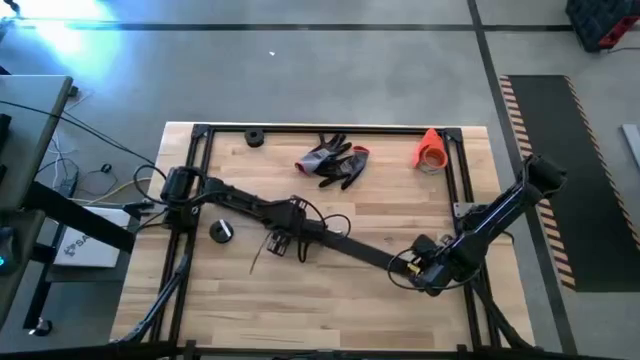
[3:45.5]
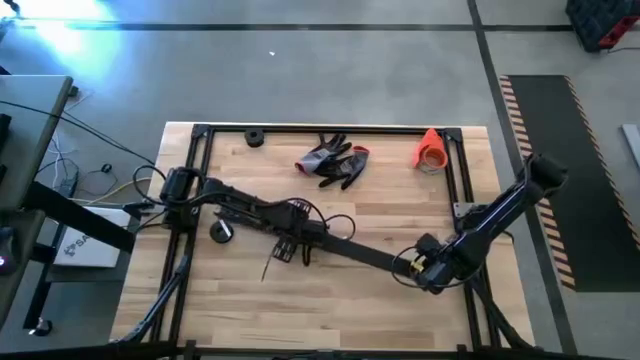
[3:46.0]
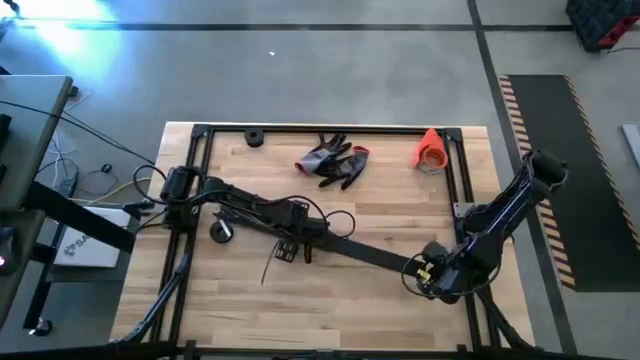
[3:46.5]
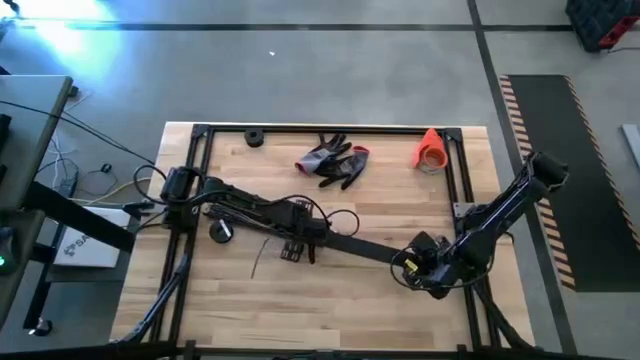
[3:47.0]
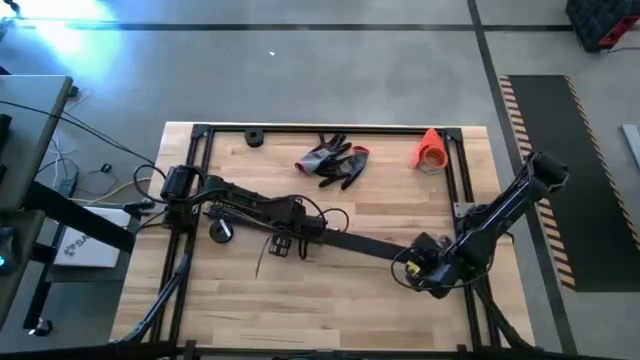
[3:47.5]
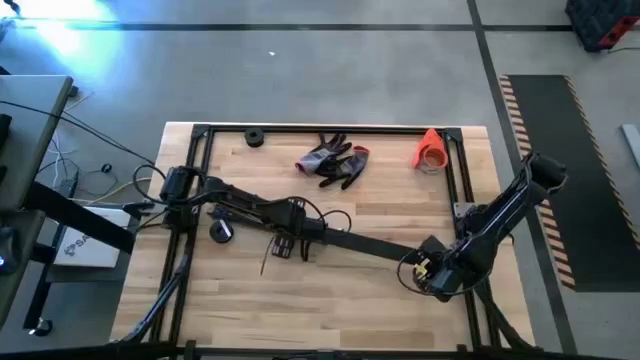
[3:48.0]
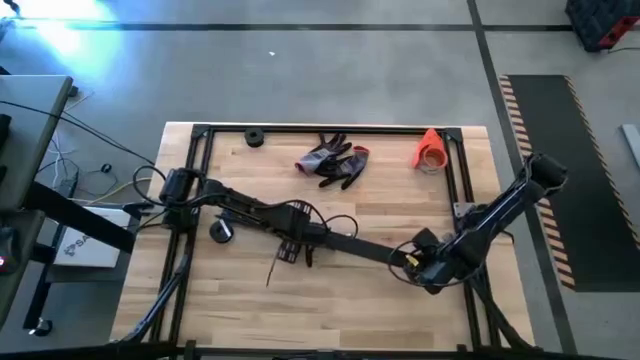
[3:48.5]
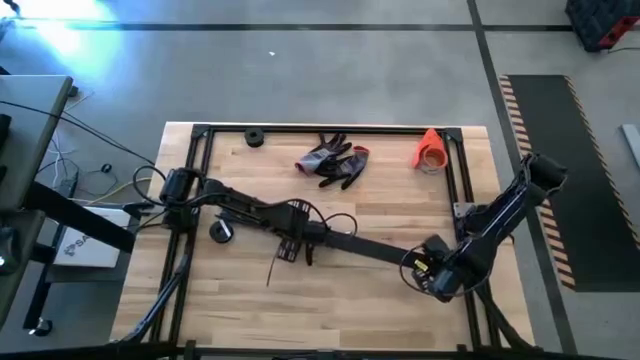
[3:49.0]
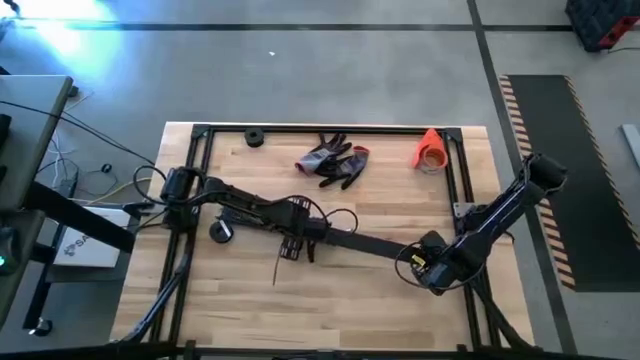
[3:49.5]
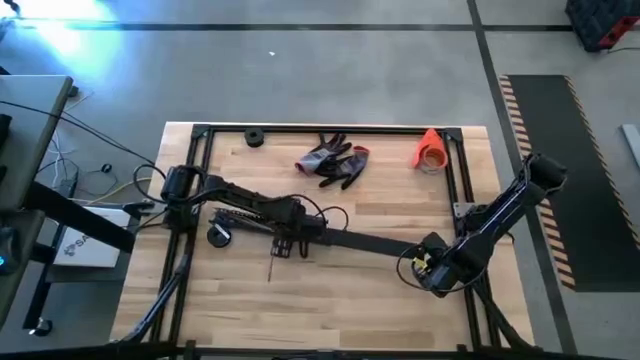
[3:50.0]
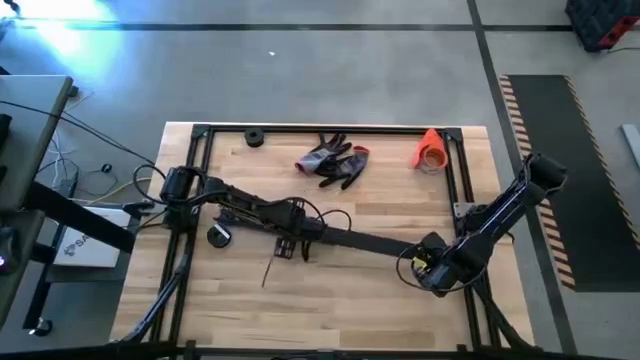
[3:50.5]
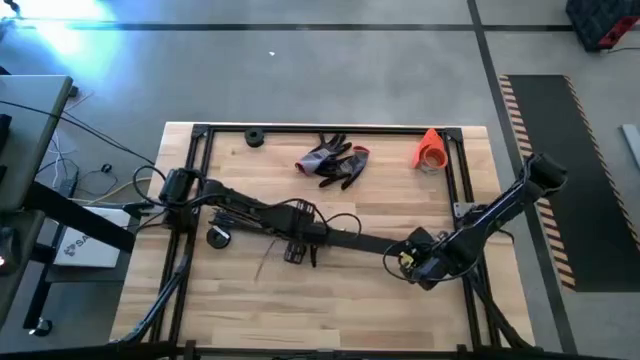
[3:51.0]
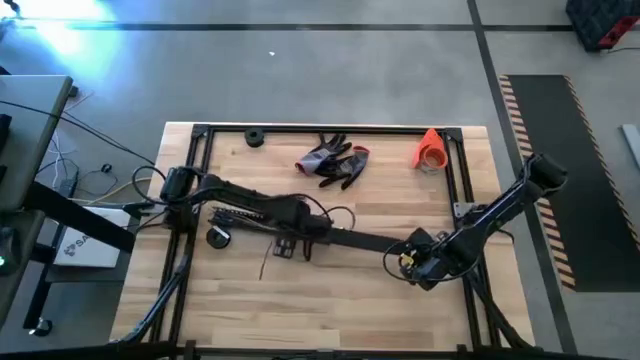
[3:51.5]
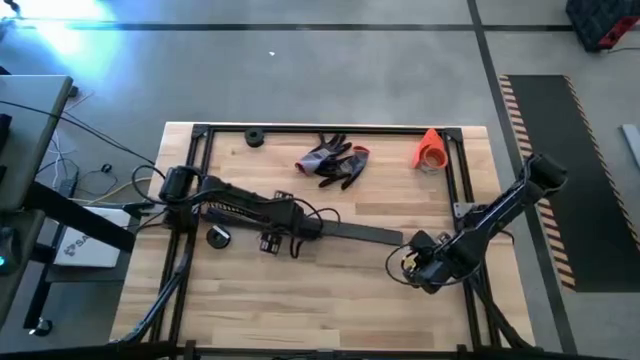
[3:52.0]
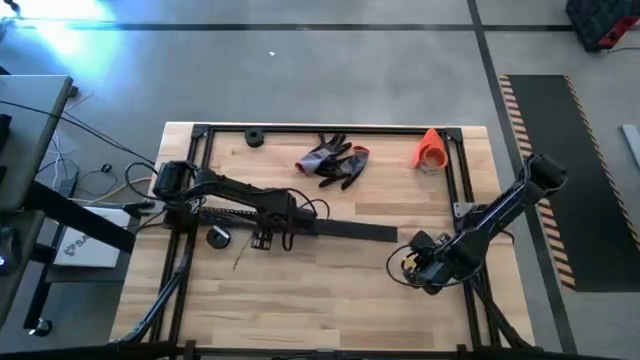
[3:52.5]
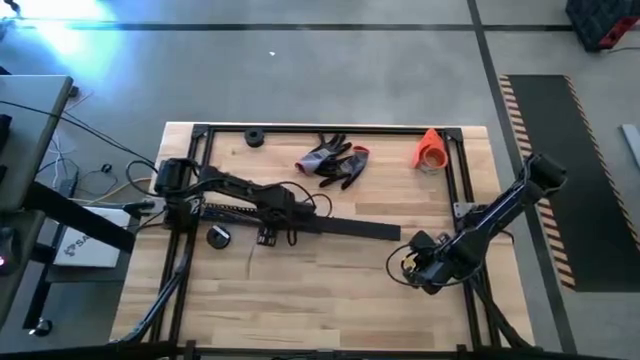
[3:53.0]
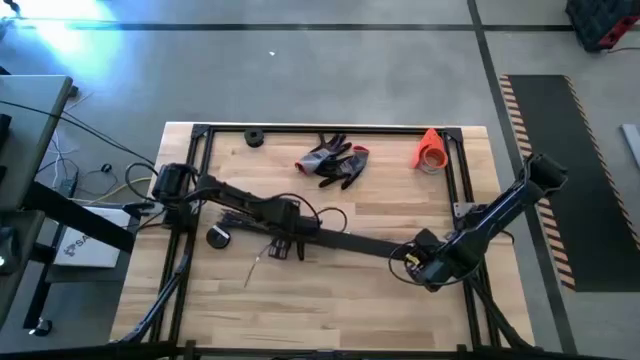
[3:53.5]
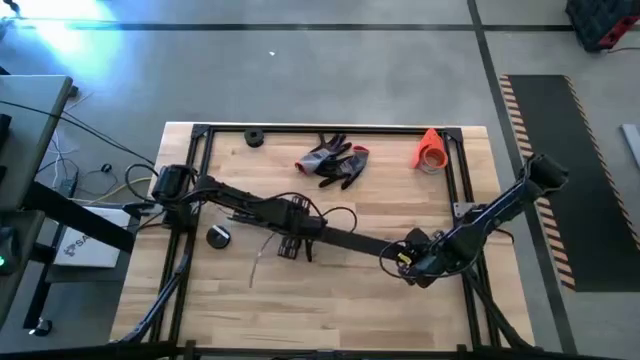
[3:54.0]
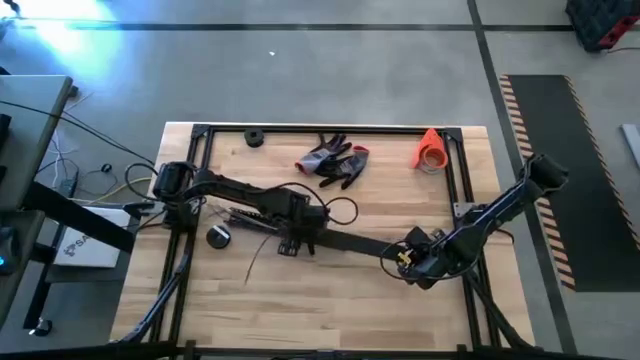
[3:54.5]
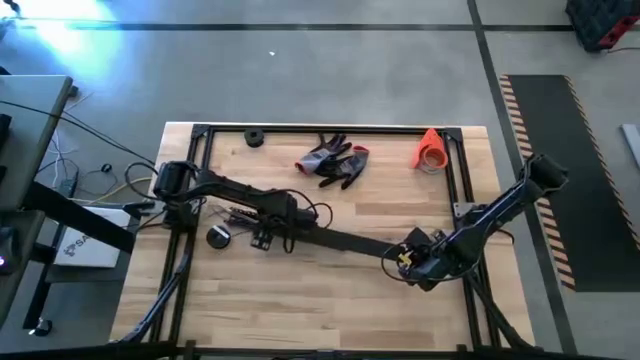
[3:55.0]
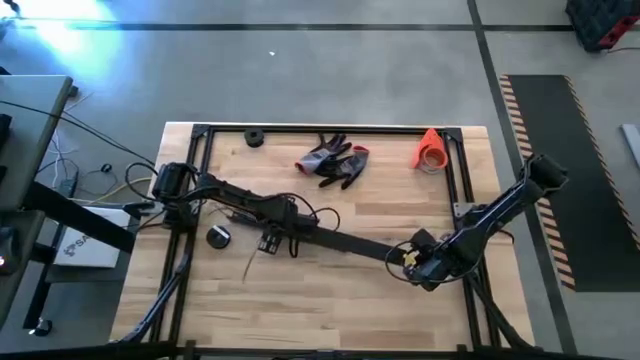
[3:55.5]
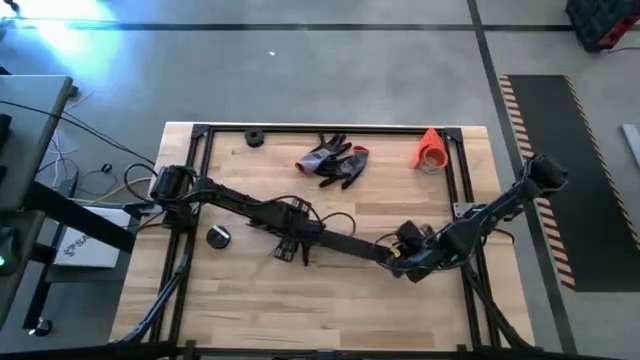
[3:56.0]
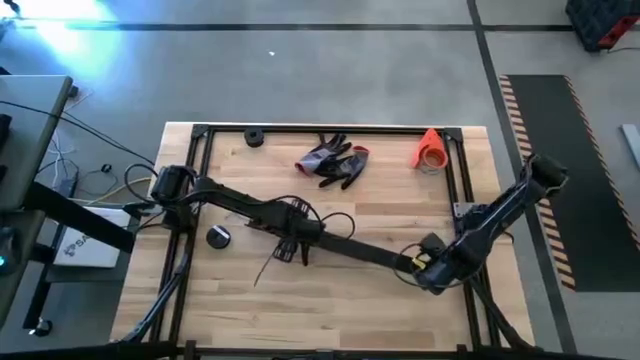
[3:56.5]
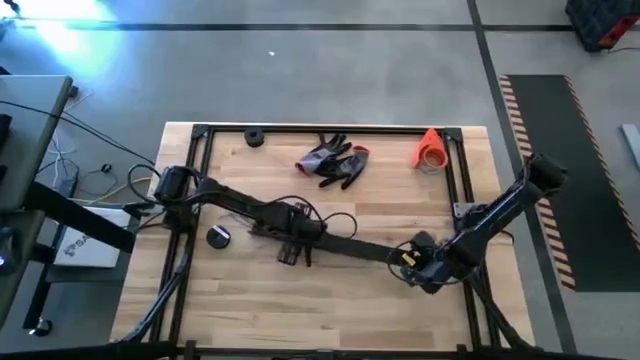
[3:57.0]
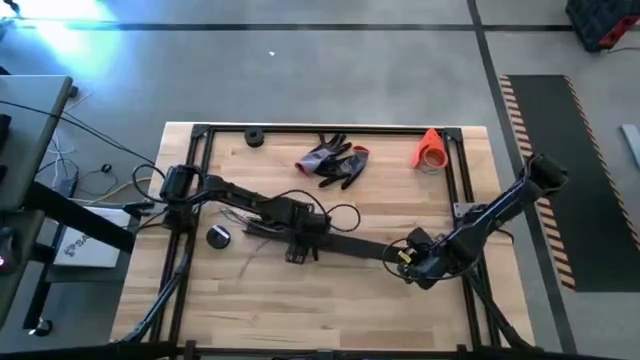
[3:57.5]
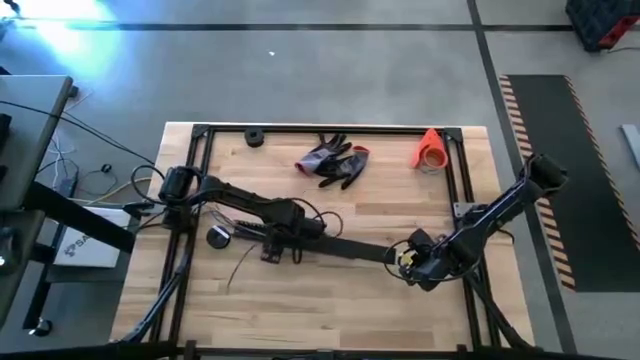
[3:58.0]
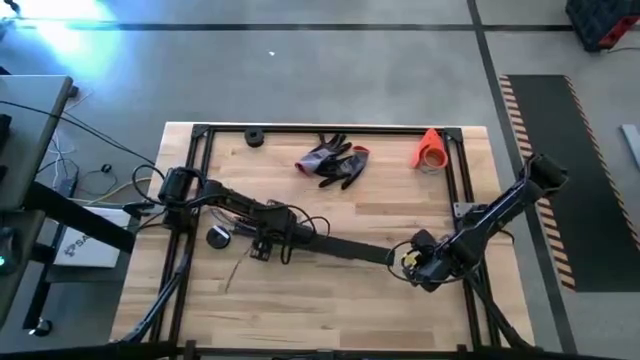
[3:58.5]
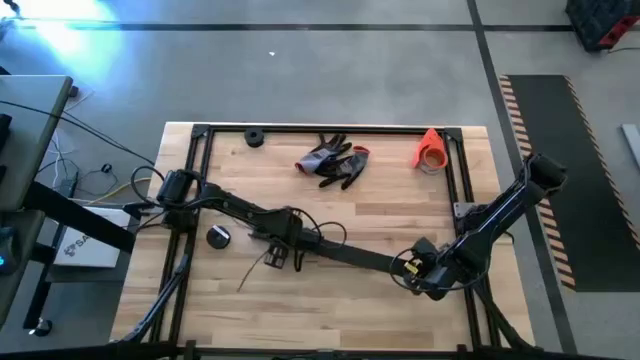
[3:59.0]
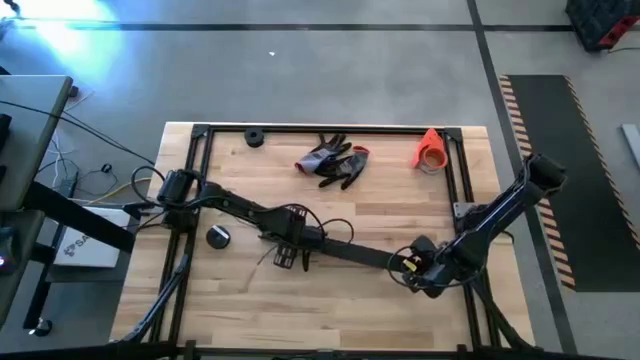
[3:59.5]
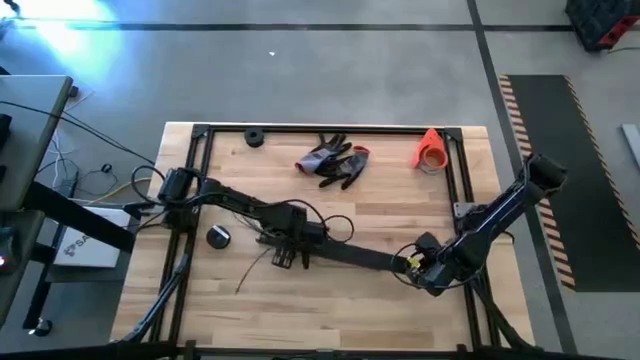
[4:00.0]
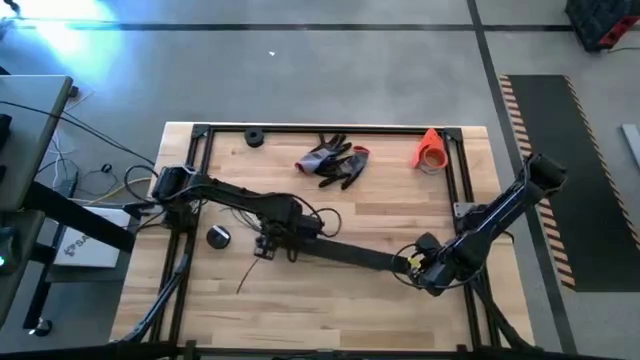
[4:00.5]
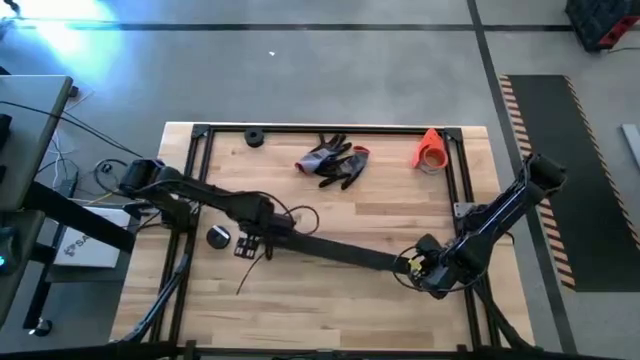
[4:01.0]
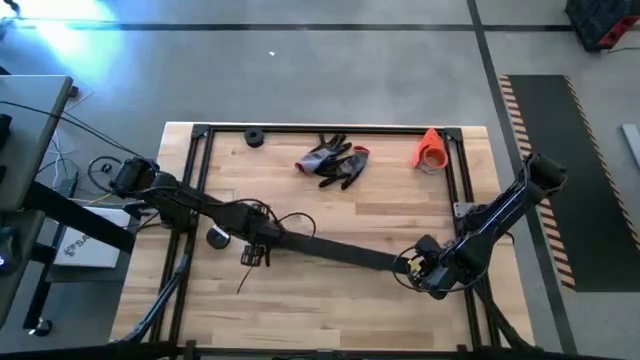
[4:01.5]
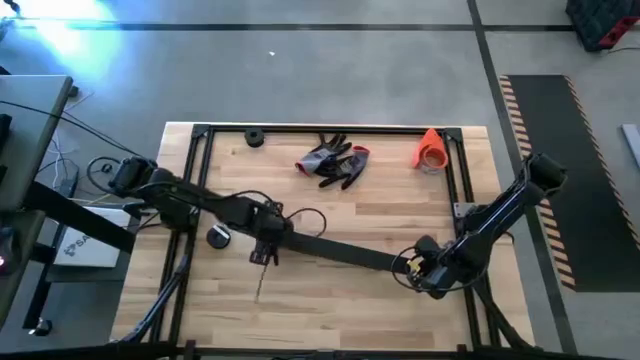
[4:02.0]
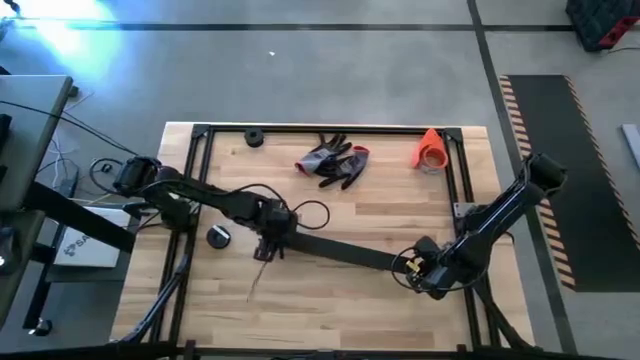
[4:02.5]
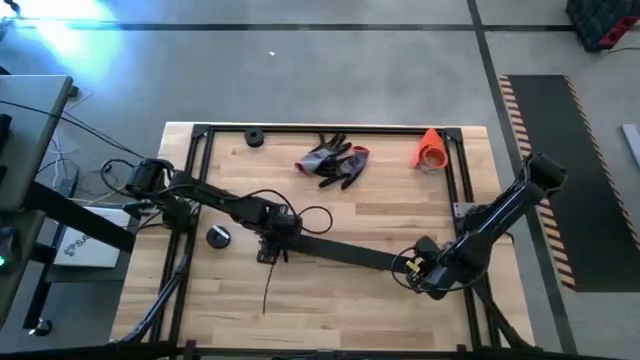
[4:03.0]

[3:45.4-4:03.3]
Task: Ziptie cables
Close the black cable duct

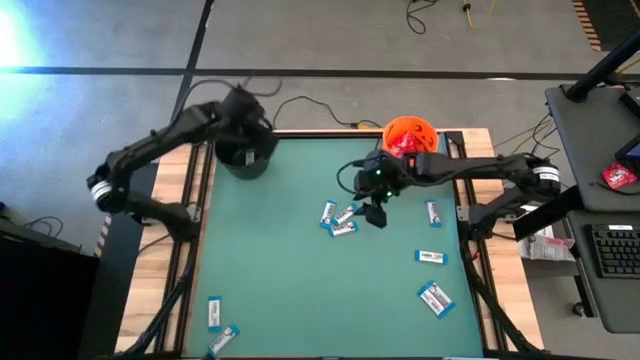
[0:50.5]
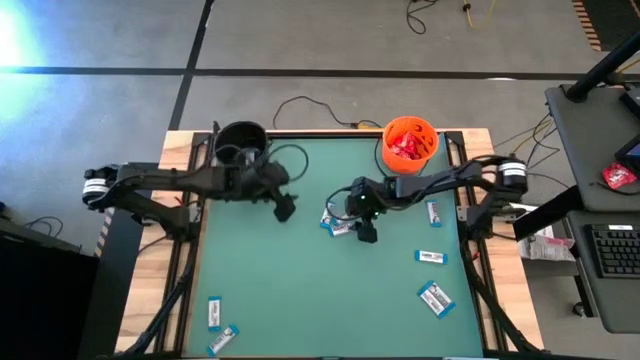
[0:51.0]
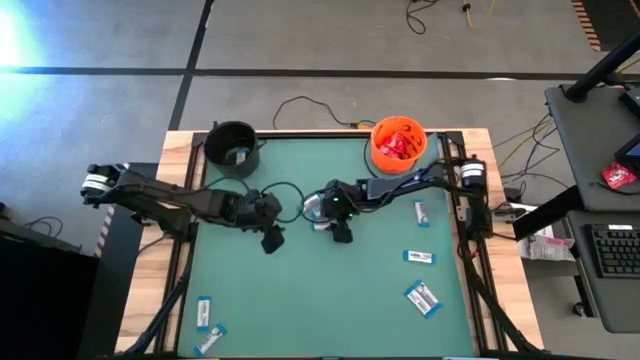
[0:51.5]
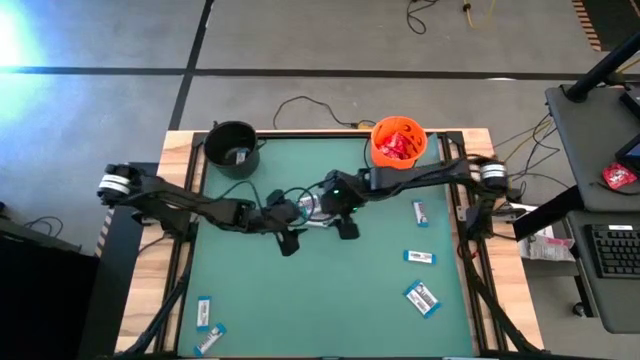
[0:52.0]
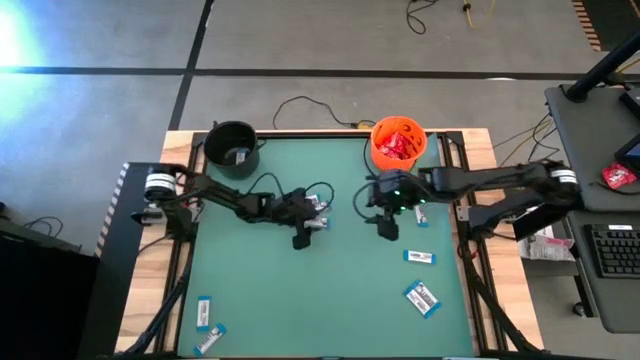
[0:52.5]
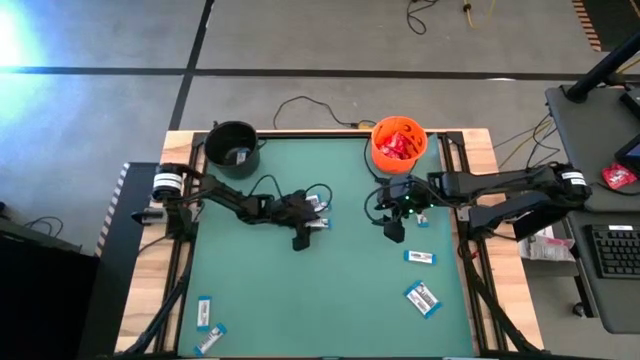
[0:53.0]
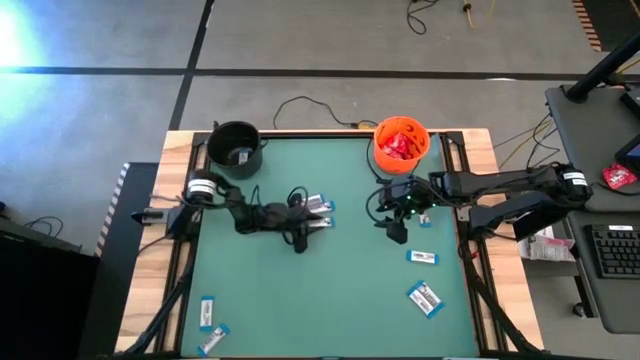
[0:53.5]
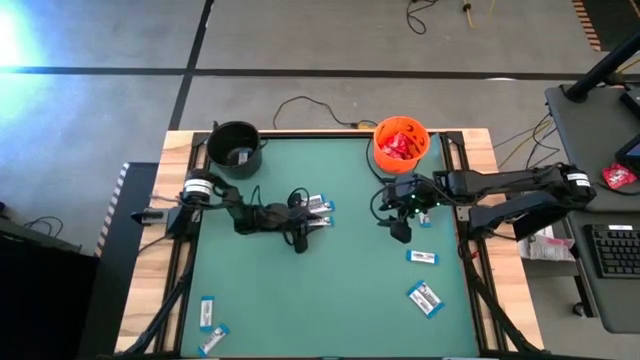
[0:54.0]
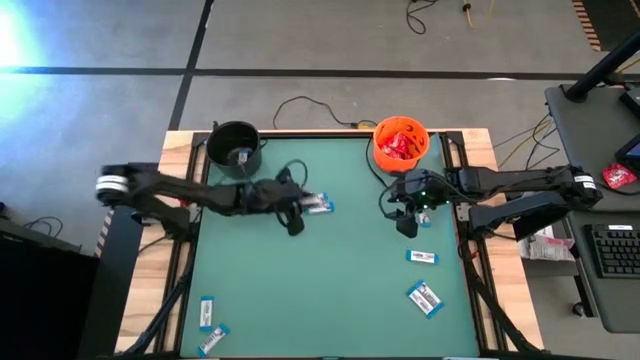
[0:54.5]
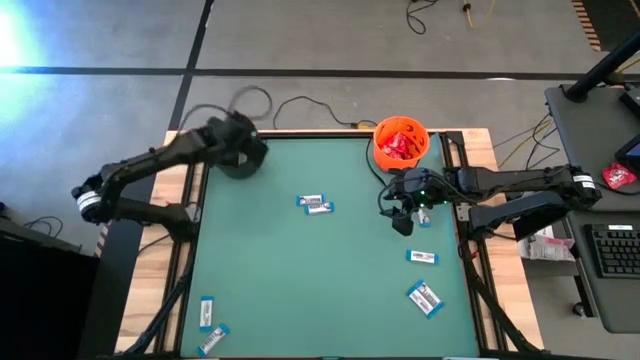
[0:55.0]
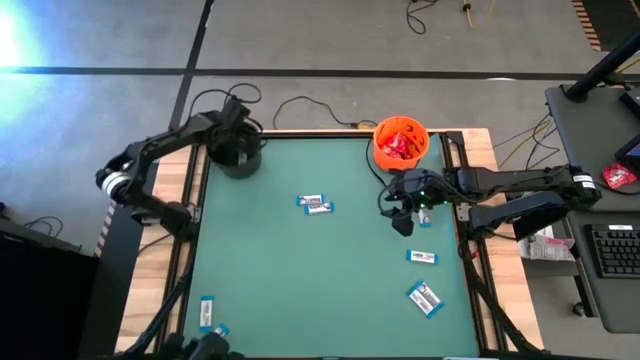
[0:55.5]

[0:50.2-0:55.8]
Task: Sort candy by brand, put in halloween buckets
Put the white candy into the black bucket
